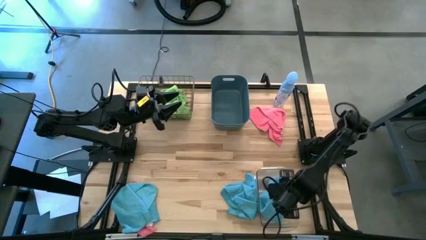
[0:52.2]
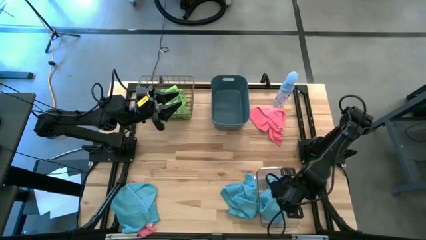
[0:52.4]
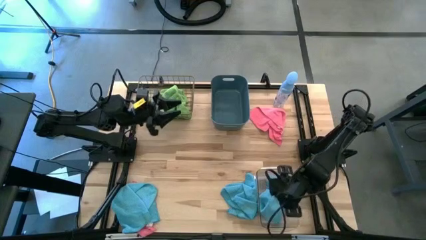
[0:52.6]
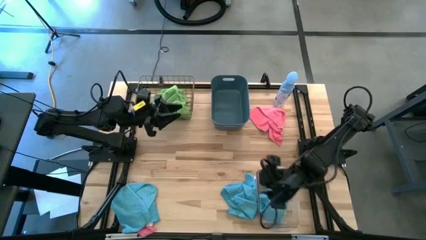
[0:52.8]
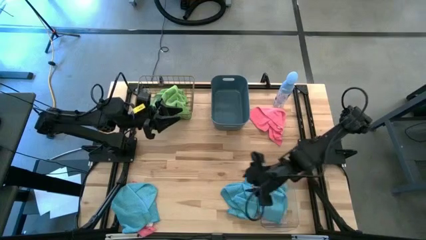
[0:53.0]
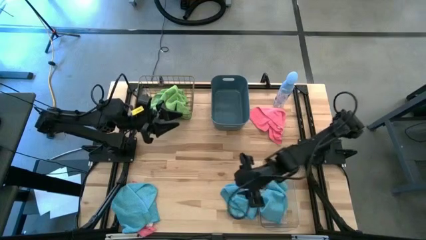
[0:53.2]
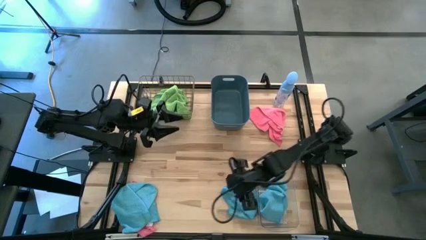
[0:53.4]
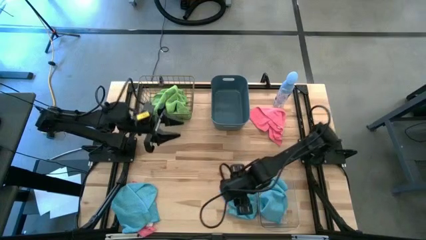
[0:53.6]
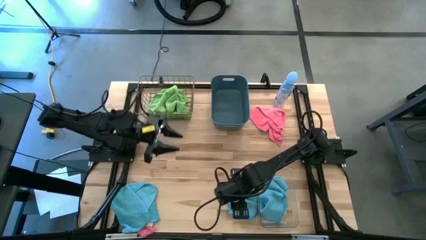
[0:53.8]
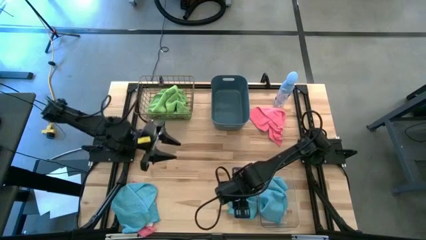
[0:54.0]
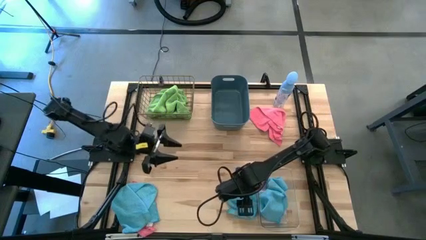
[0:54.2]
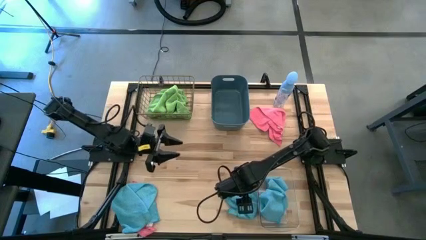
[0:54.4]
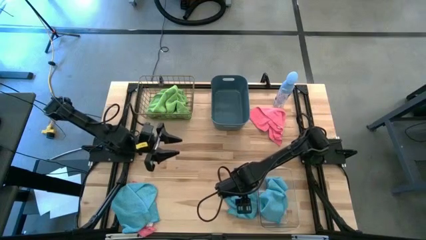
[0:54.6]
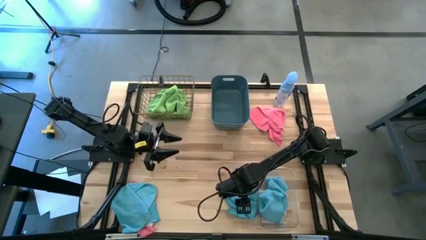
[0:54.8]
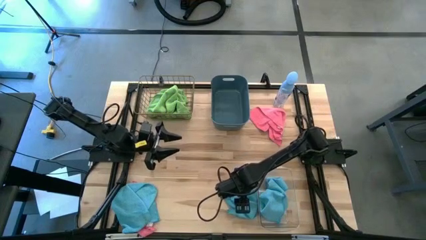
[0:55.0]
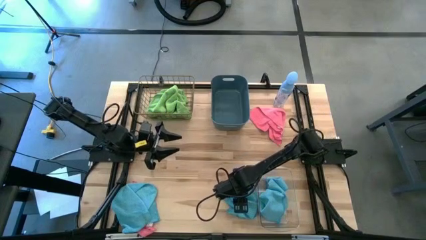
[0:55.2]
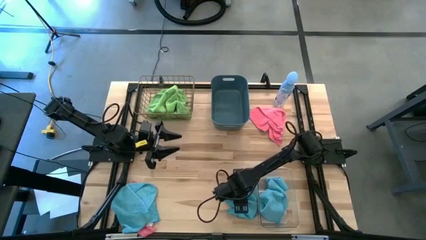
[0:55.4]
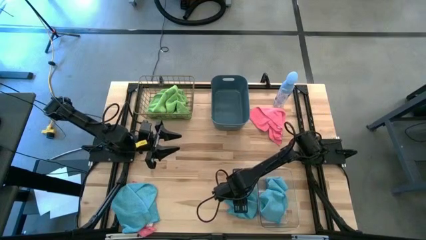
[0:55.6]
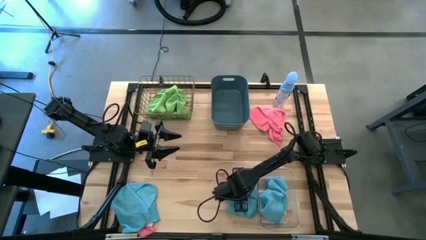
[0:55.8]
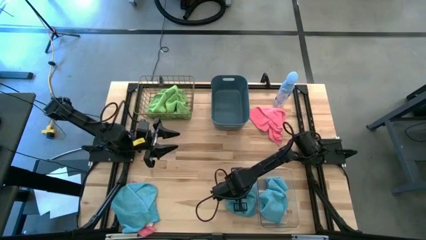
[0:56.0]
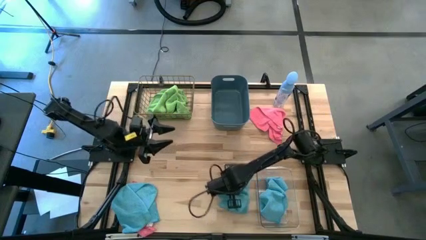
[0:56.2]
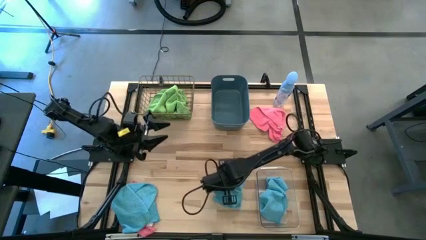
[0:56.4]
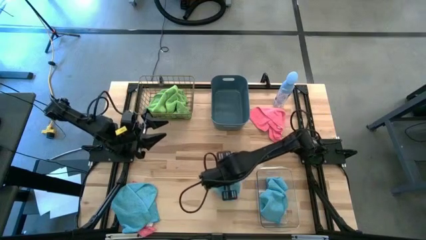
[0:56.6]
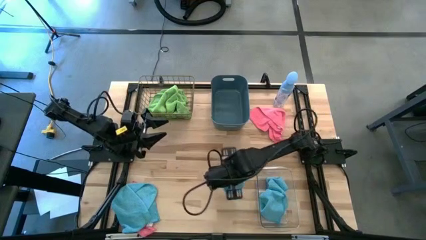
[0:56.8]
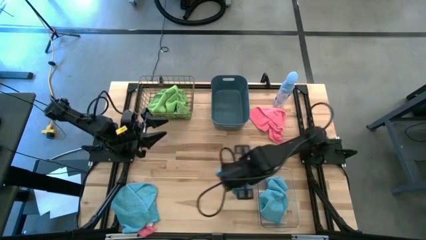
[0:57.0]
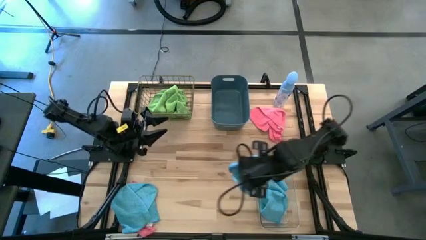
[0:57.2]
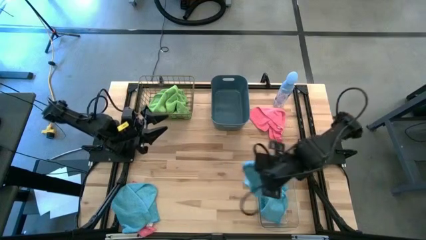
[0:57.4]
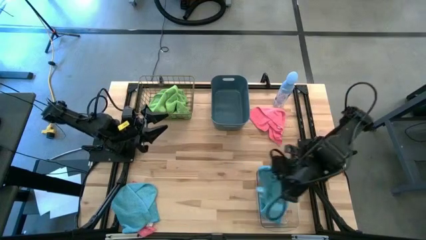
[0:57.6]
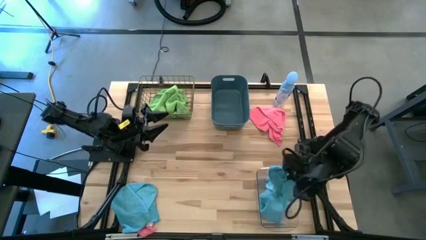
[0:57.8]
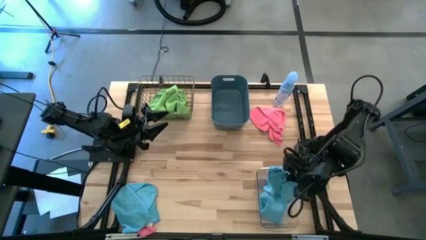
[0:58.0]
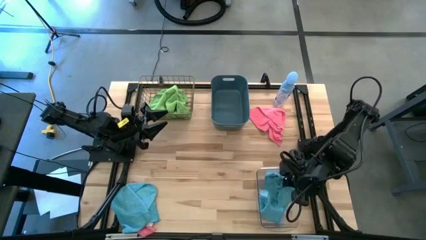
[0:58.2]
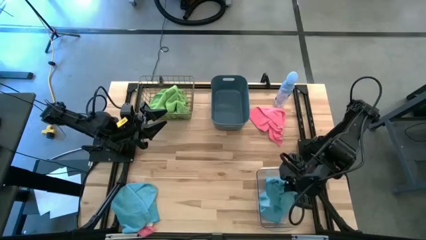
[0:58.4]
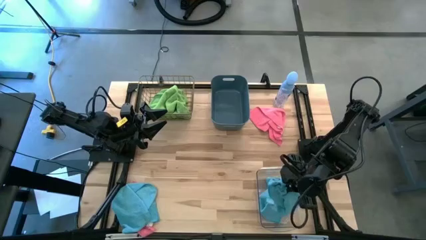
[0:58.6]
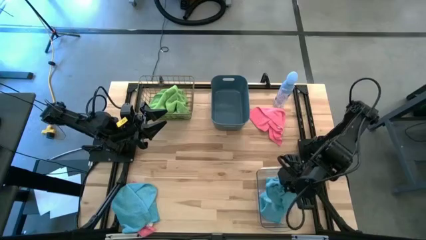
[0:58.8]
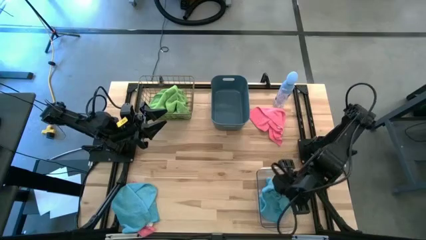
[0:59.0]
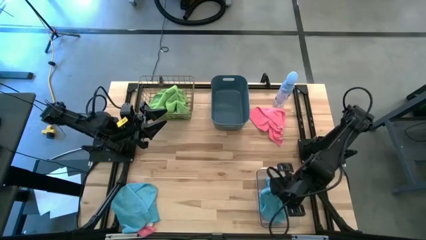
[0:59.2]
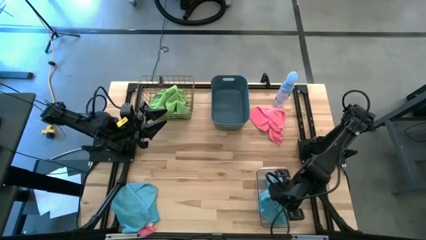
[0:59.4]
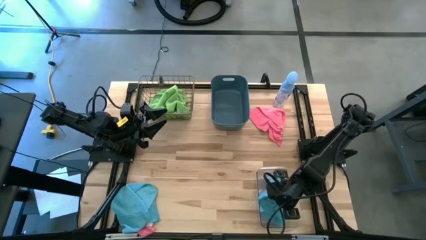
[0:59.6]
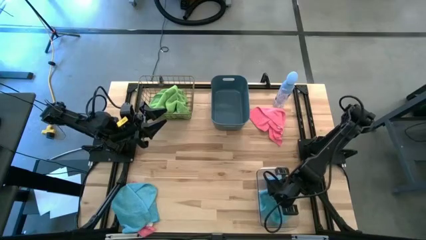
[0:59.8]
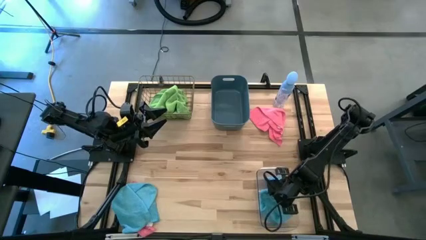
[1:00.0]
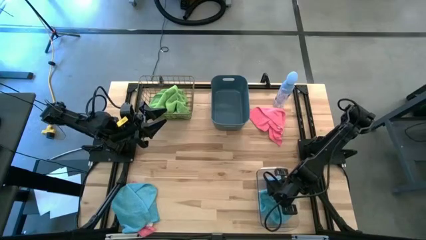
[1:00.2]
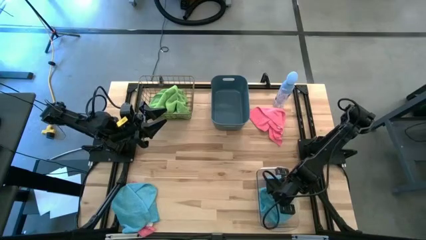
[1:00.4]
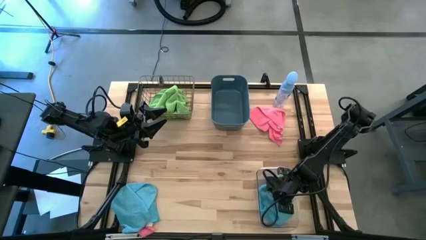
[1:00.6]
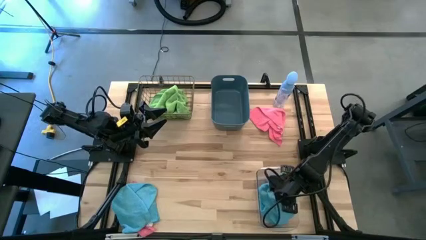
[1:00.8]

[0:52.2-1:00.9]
Task: Sort microfiber towel by color & place in baskets
Put the right blue towel into the transparent bin

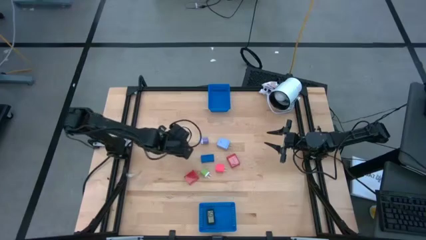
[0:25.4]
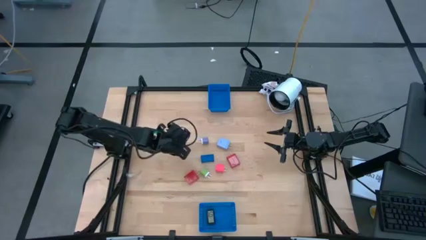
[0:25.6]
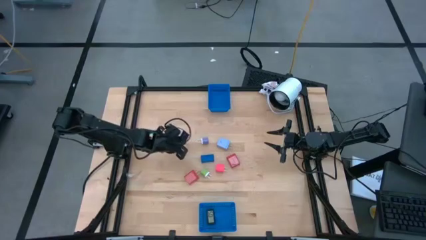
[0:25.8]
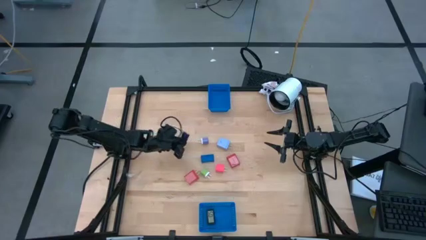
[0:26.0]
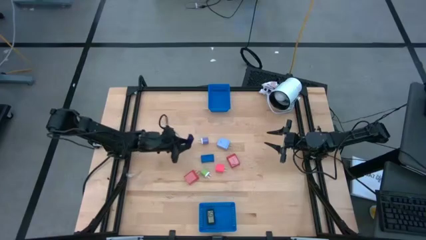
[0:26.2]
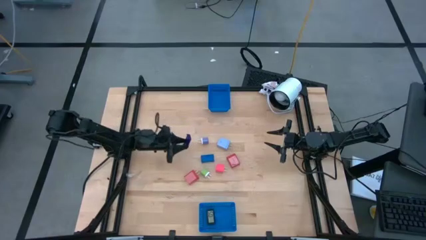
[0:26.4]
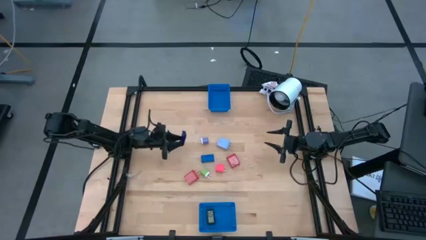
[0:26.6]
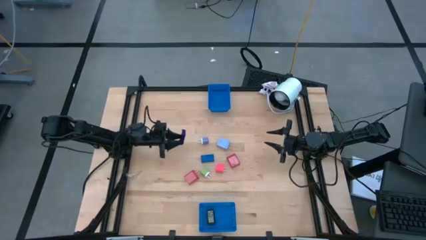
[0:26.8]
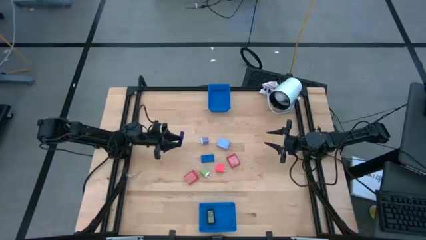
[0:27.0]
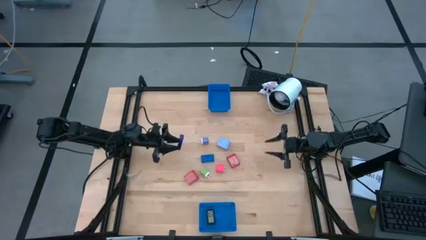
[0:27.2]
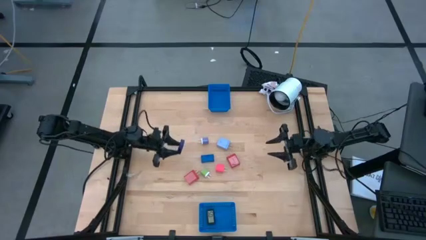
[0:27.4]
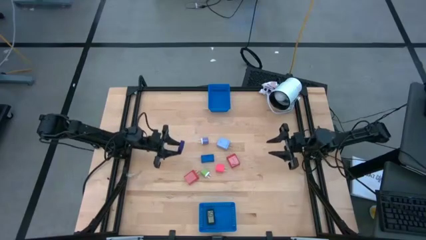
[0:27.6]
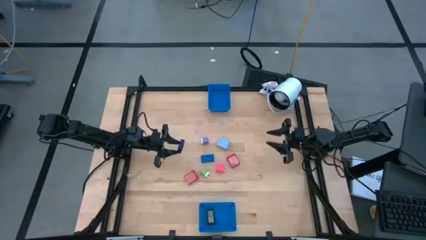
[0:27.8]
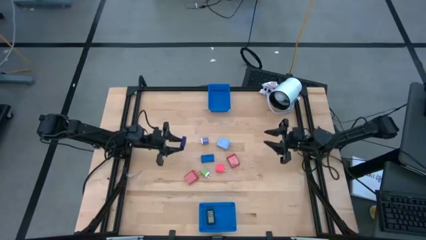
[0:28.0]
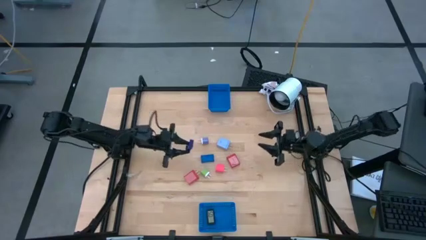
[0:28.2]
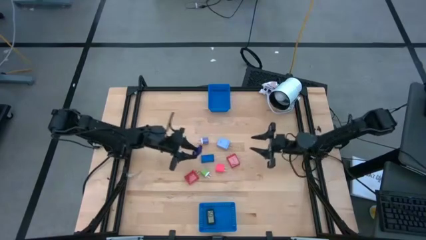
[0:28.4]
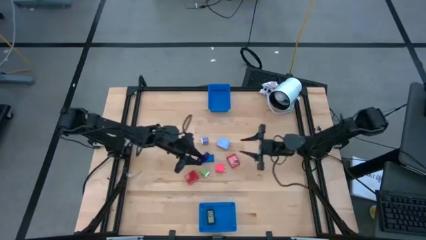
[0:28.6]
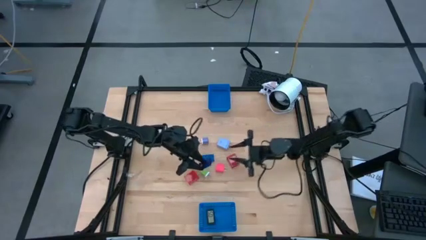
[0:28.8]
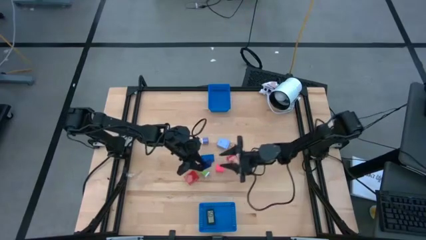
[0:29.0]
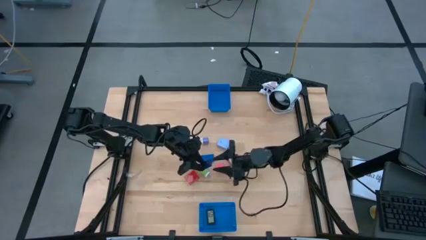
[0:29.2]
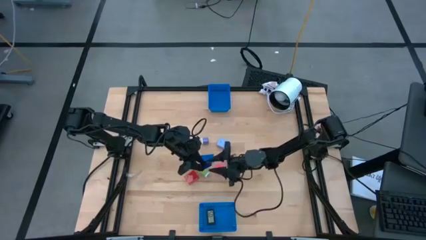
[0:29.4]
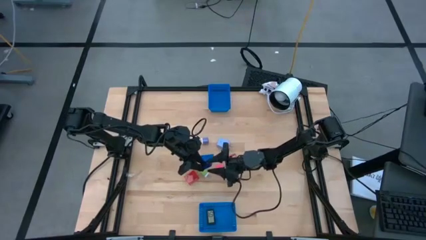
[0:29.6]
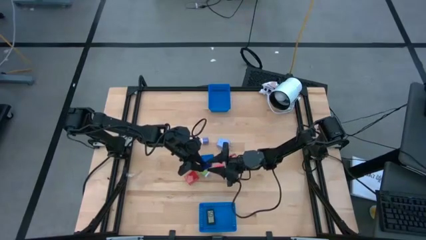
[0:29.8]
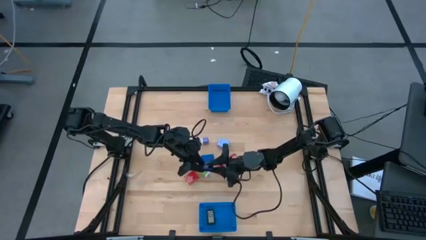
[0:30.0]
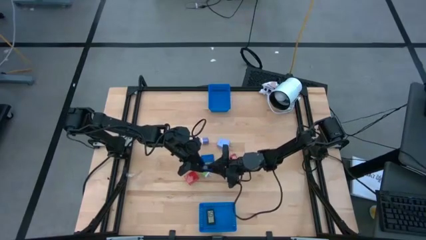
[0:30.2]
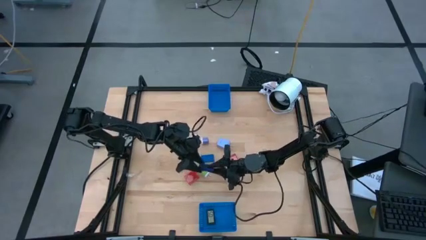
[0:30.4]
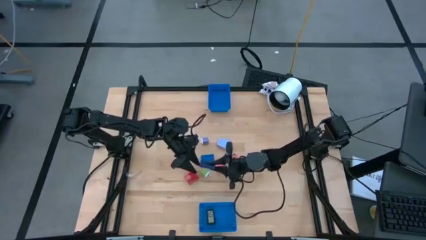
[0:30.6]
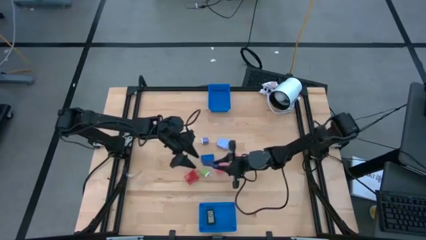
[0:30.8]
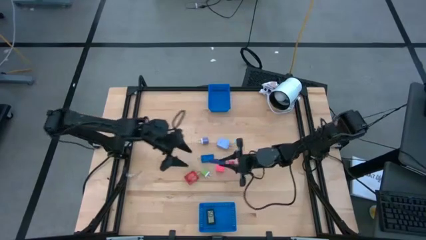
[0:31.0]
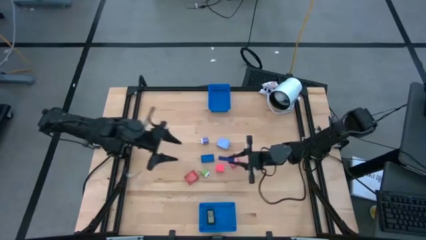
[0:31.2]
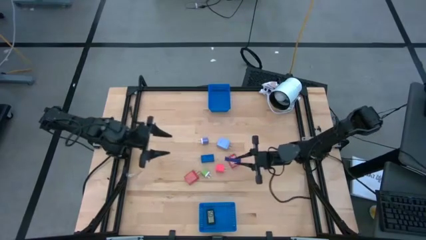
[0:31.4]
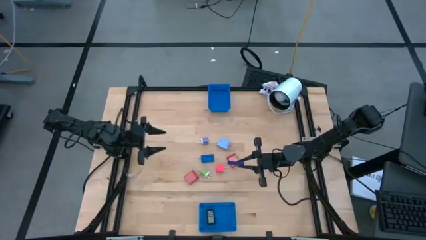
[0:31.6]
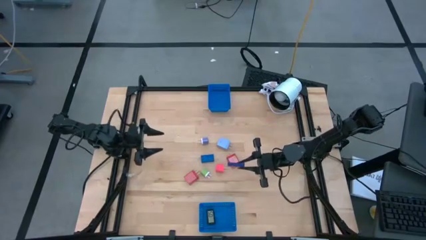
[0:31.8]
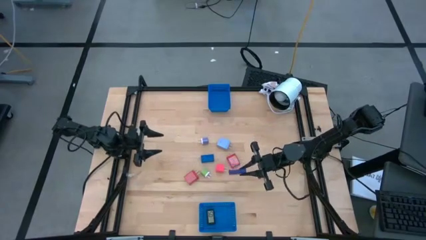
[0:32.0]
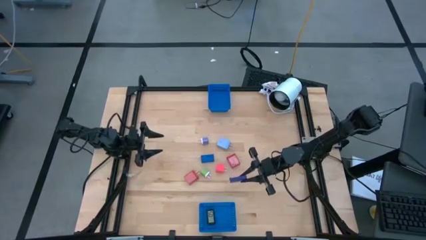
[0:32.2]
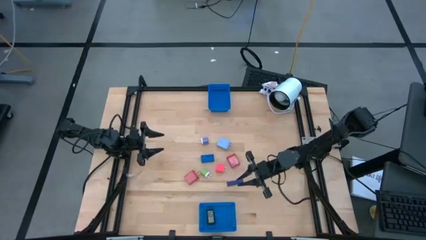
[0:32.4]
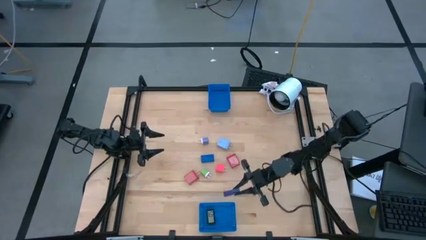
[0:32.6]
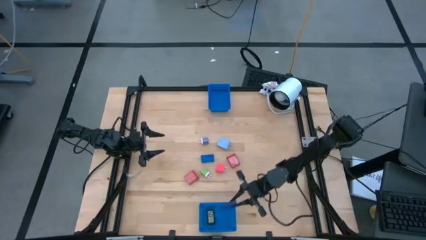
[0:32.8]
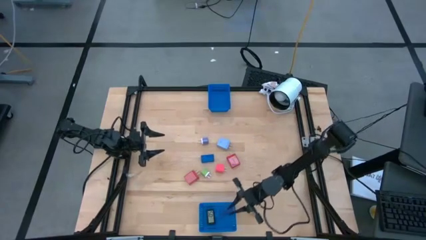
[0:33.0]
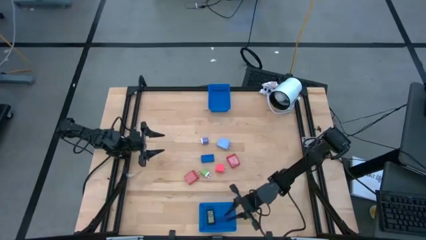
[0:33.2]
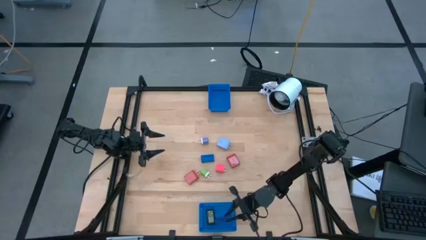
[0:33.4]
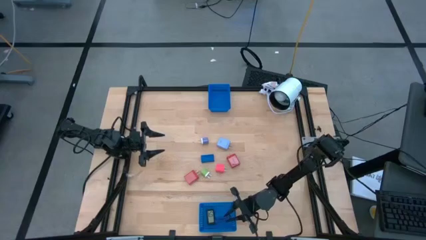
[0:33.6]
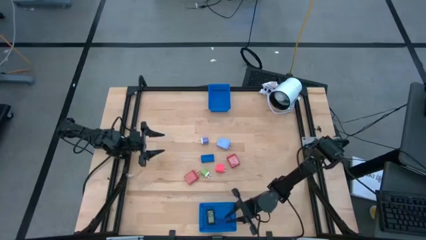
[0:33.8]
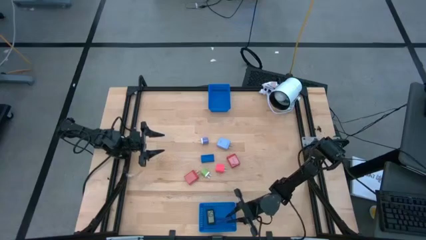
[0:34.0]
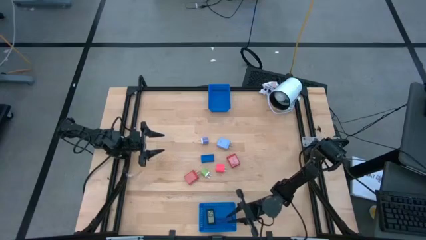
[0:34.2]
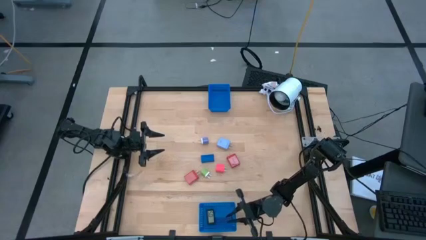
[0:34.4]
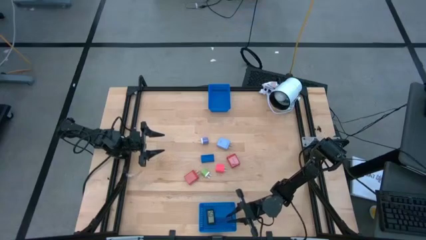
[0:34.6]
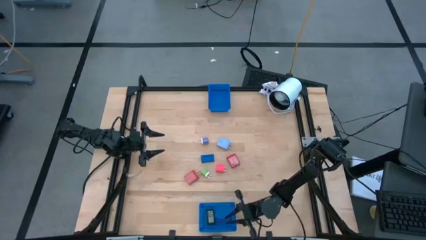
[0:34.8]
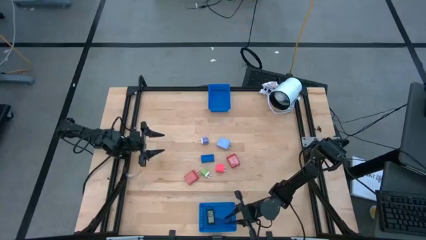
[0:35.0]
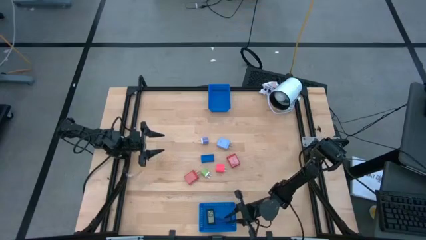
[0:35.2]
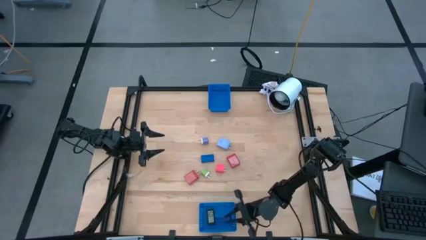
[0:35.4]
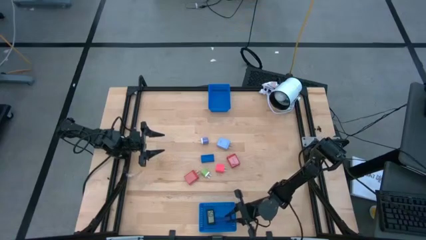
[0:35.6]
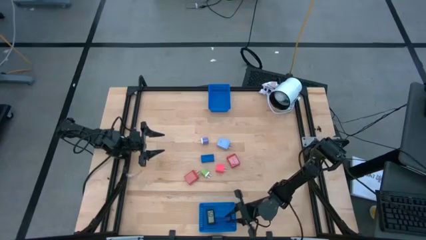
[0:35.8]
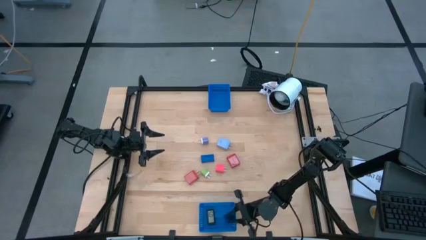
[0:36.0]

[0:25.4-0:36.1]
Task: Pick & Place Office items
Put the purple digital timer into the bottom blue bin
